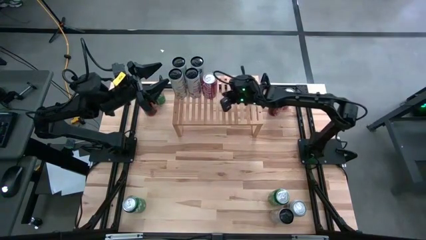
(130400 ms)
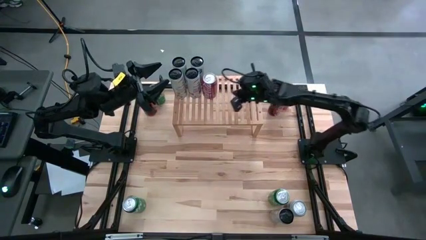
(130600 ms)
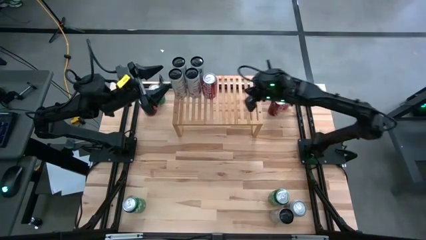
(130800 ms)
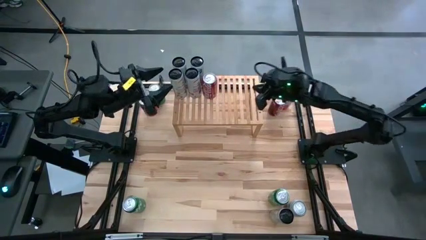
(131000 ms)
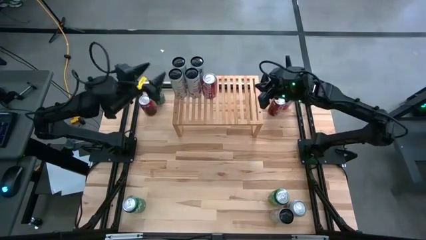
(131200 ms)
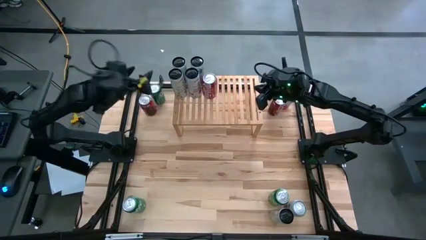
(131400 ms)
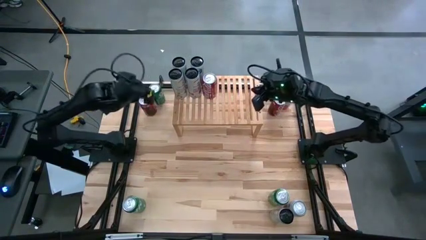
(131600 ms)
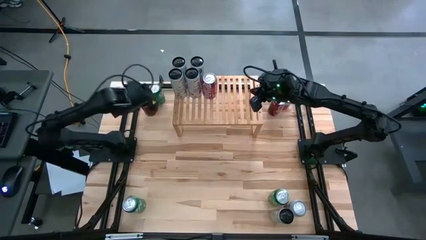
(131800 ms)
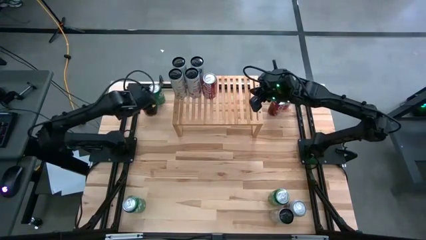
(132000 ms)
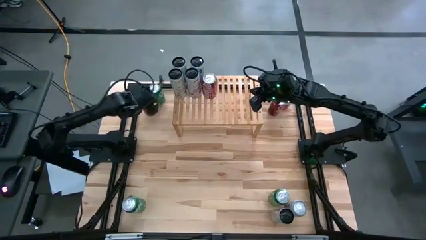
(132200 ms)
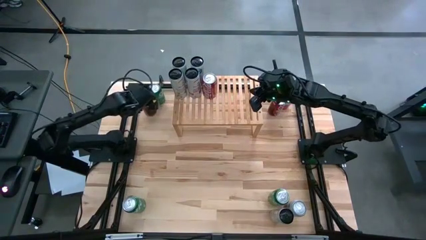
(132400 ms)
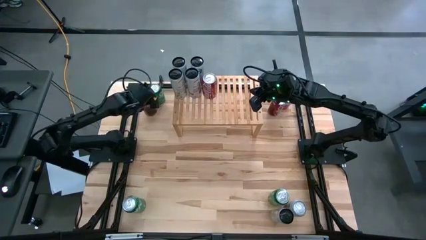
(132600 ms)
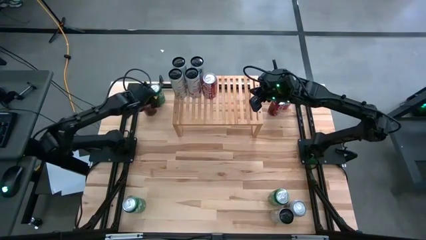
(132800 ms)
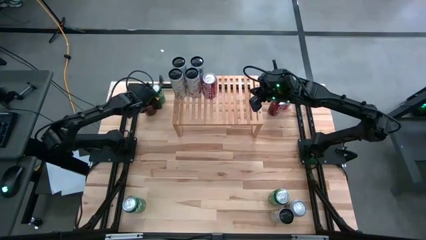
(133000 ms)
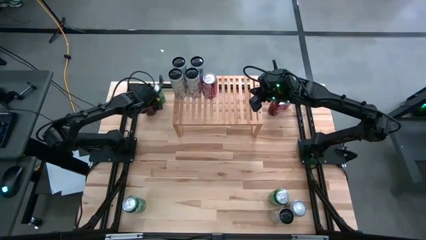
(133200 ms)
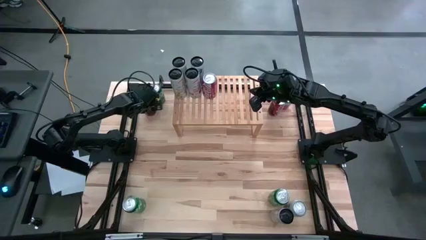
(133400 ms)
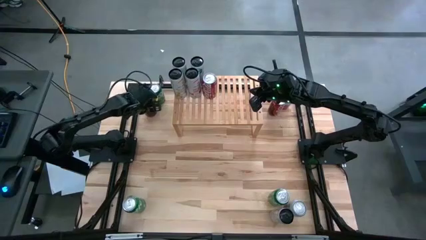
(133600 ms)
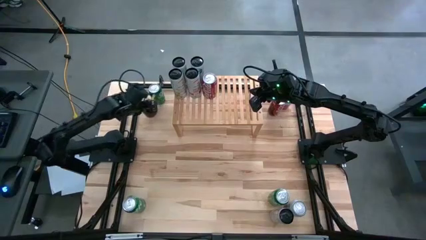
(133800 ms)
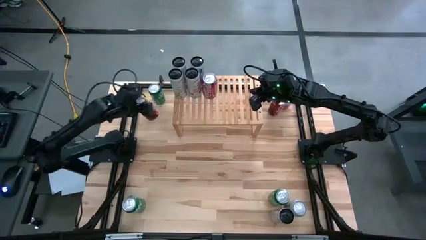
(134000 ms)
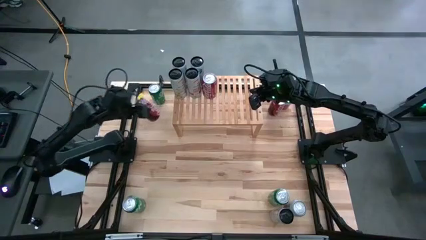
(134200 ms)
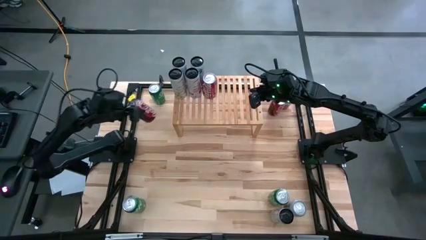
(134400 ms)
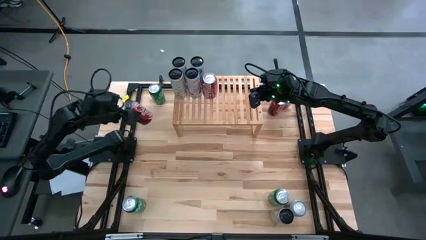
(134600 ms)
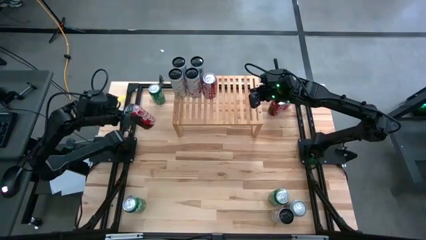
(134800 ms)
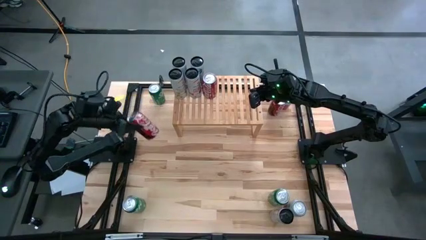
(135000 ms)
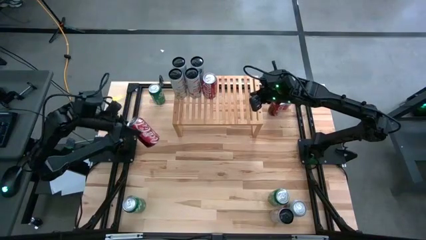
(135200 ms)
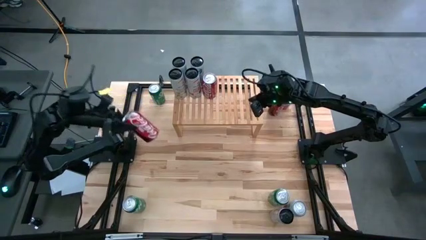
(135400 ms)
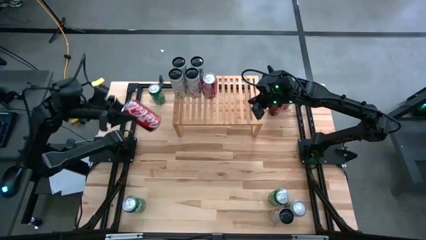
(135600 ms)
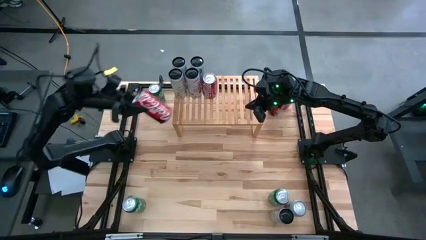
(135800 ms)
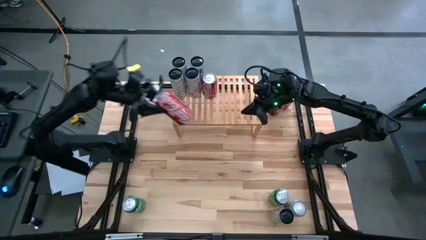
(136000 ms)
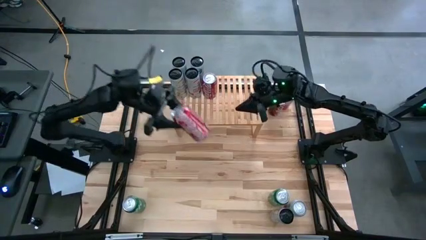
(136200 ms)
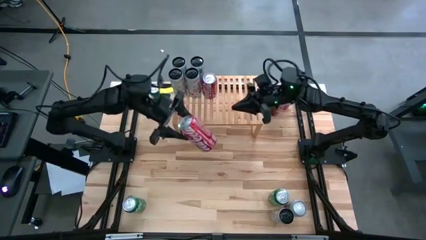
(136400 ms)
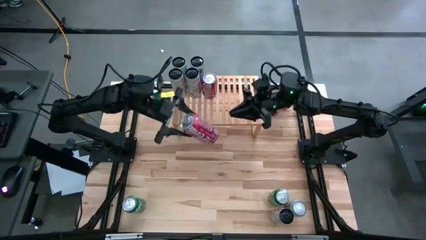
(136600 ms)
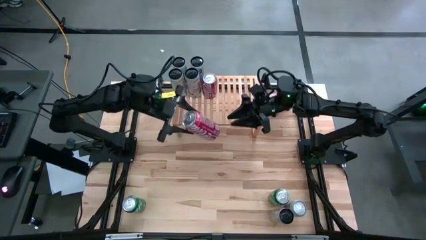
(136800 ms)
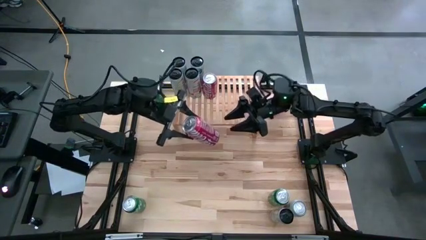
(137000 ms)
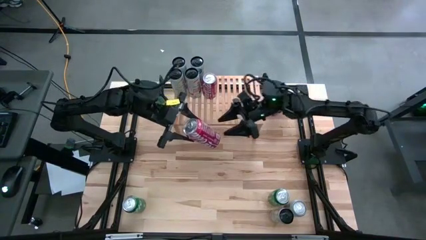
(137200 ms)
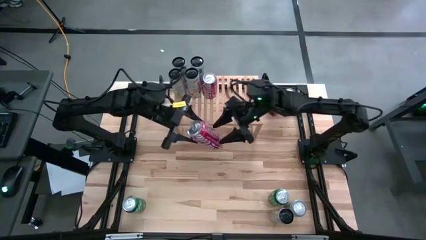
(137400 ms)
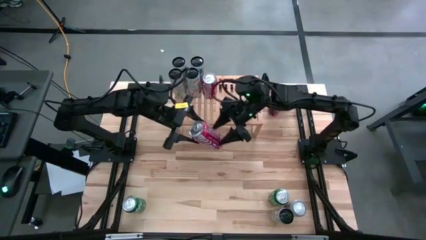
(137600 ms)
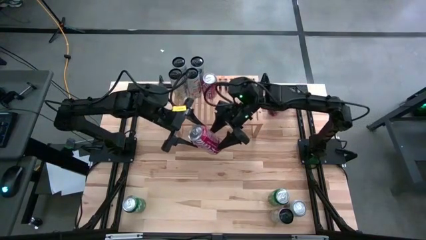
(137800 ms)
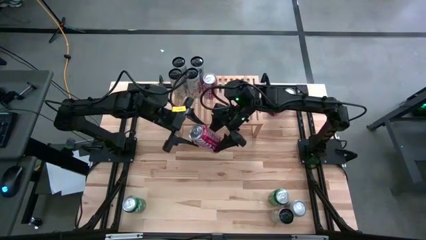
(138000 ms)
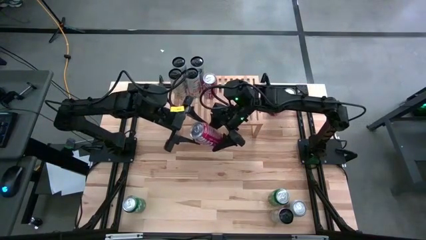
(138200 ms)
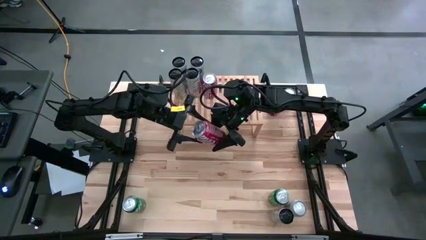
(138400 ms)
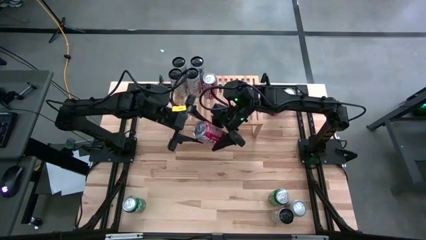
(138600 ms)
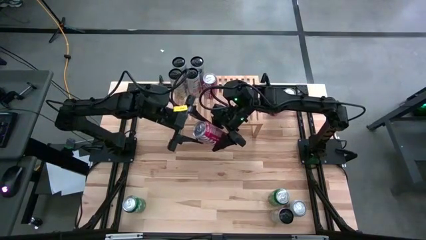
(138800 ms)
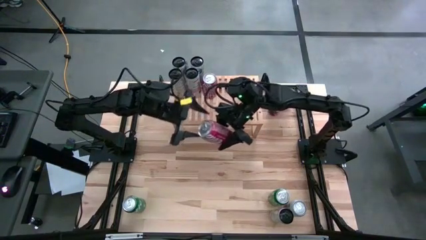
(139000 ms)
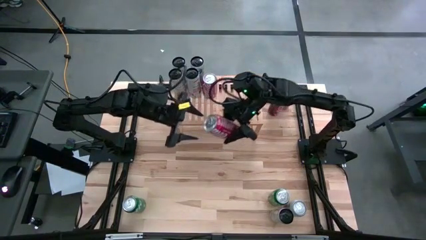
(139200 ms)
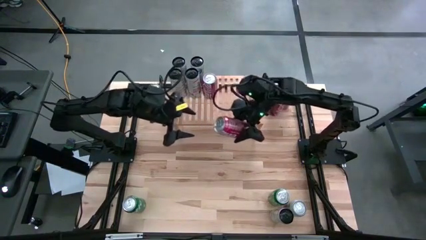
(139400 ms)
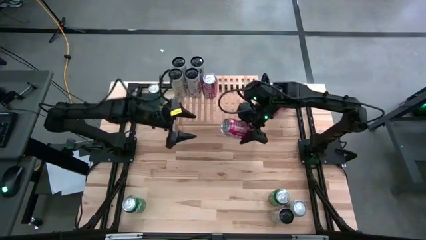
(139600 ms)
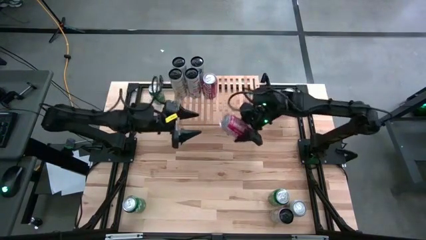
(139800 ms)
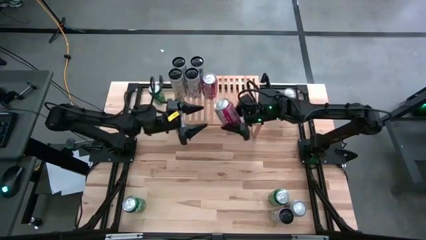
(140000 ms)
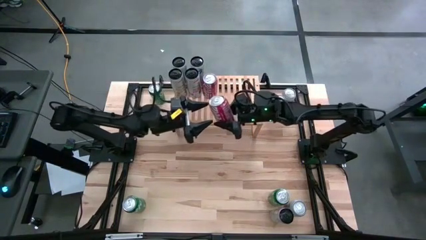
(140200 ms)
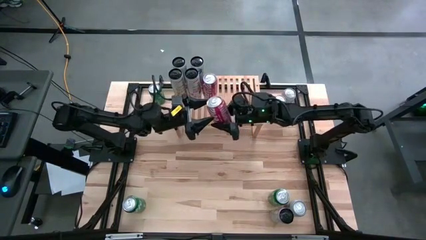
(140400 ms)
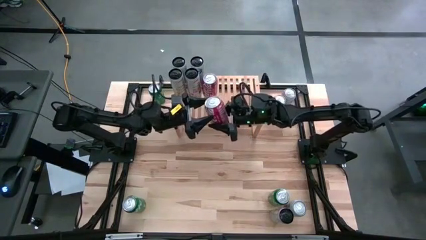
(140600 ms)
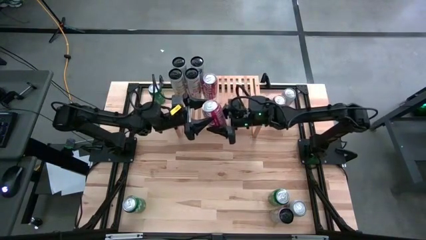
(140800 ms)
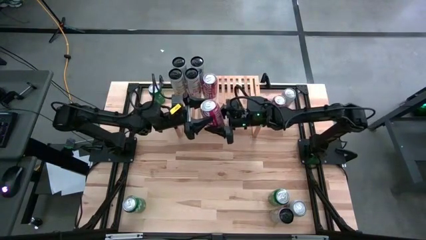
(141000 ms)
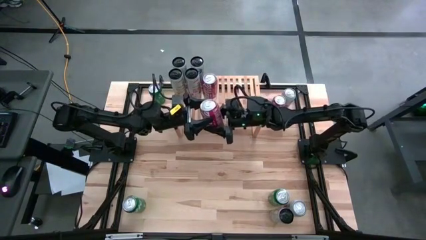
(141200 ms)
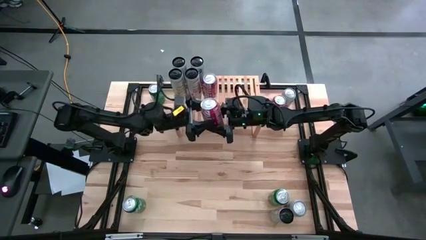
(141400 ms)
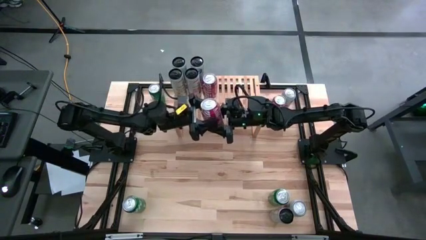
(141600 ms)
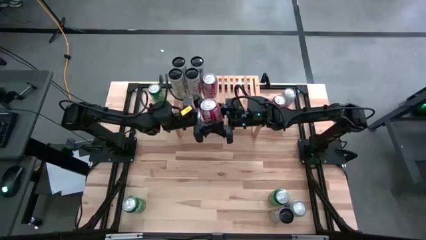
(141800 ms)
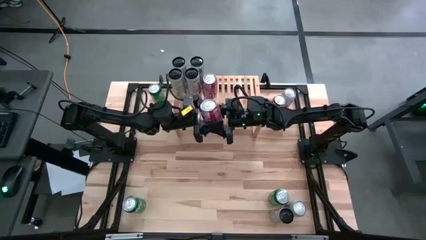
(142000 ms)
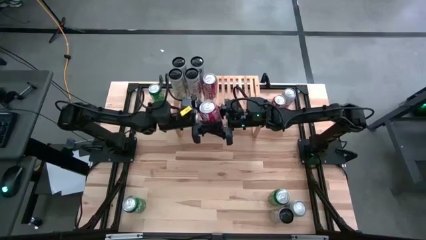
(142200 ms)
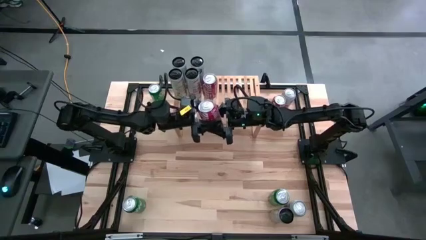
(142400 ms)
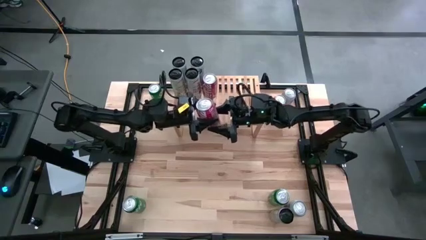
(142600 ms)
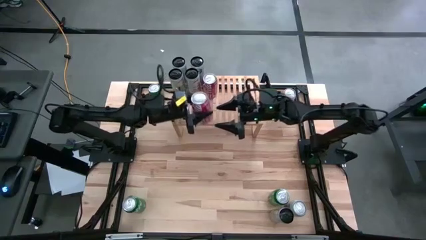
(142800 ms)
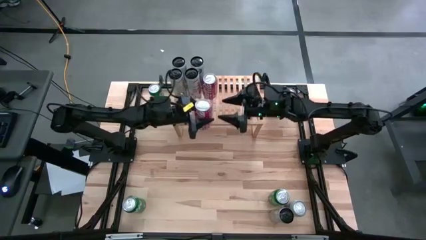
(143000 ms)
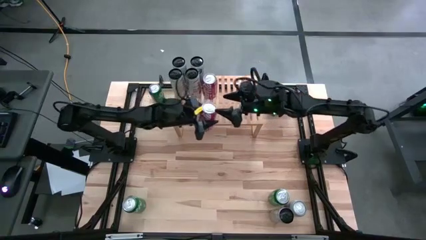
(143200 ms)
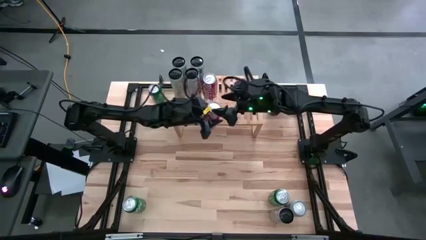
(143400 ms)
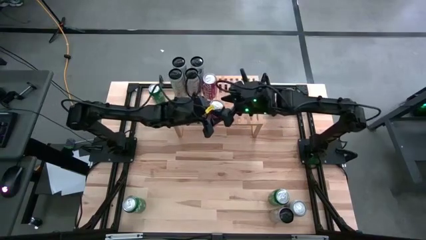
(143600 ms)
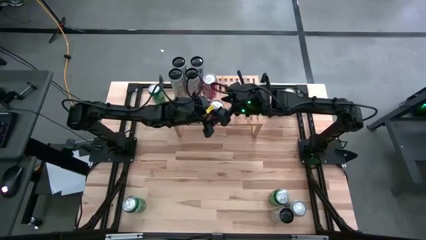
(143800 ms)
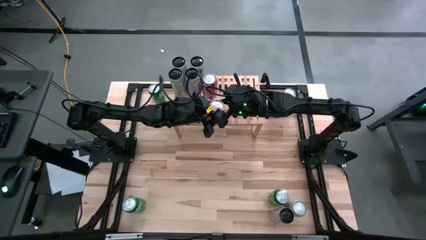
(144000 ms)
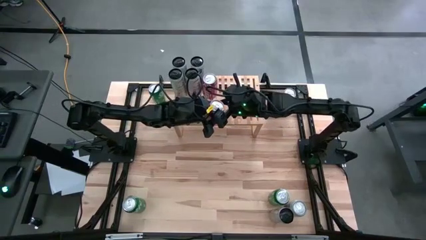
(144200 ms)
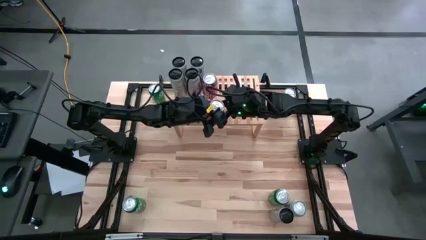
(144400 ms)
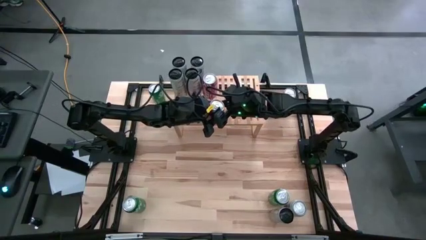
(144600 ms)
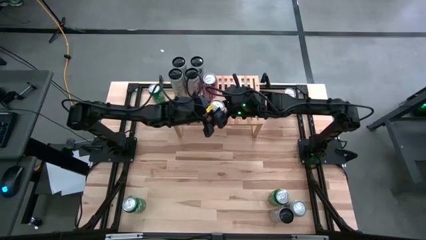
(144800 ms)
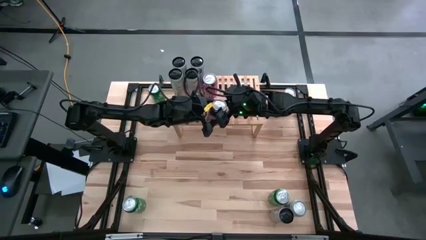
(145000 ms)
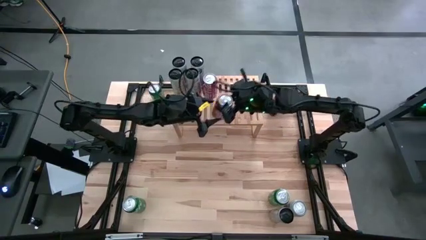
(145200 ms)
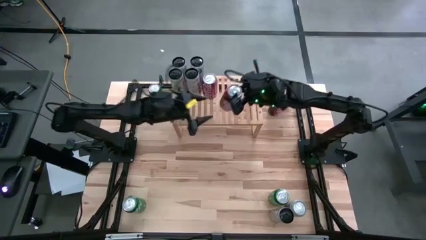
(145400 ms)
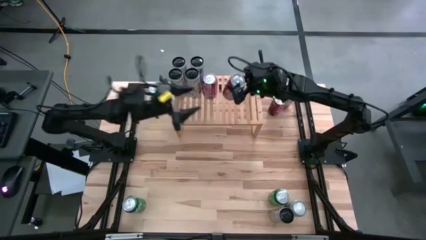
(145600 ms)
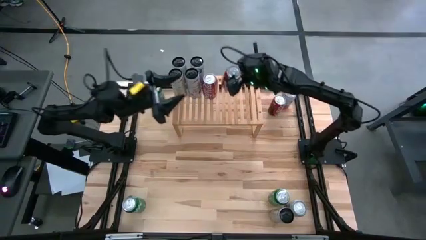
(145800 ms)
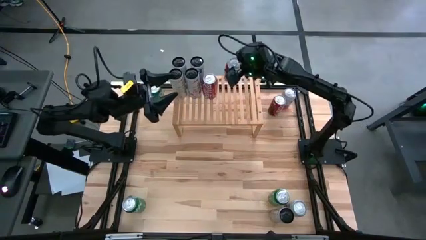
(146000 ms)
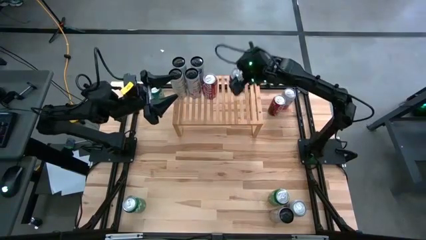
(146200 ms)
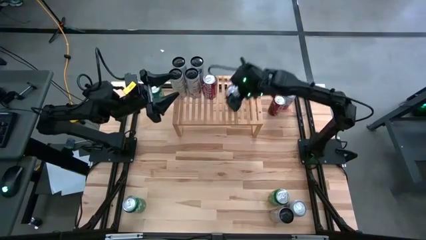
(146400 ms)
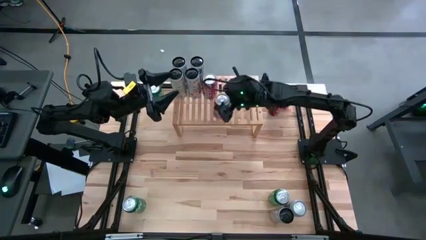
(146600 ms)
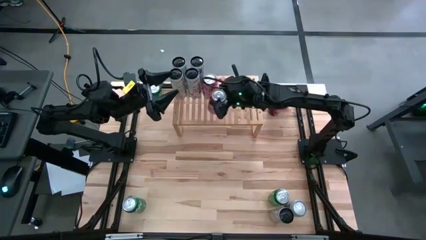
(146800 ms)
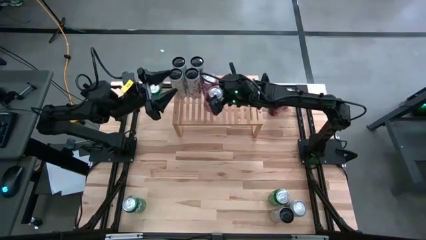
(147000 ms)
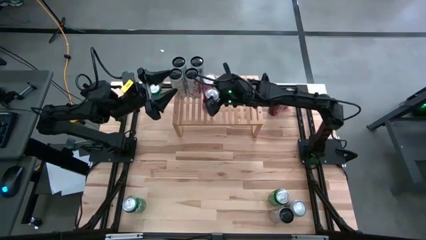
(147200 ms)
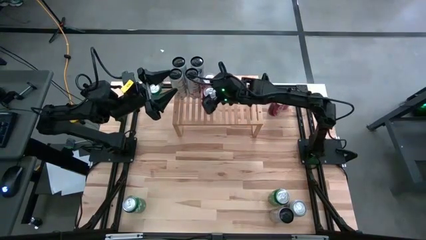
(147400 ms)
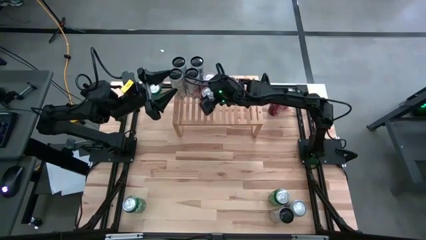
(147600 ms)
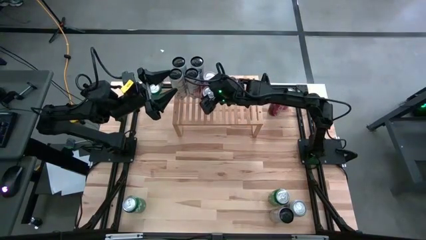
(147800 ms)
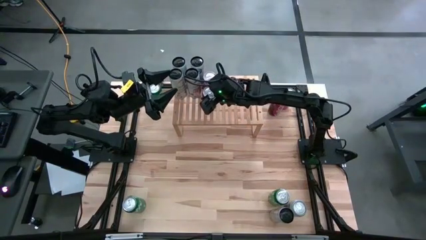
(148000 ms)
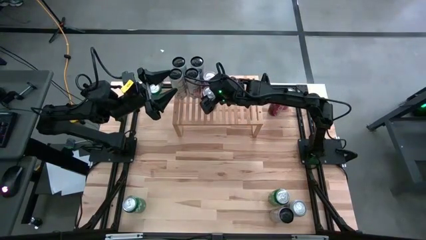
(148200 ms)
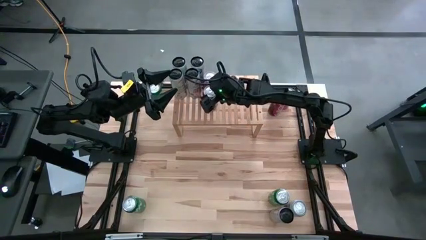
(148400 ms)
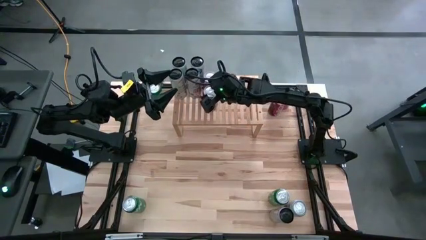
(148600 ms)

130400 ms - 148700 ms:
Task: Place canned beverage on shelf
Put the left red soda can on the shelf aligned with other red soda can
